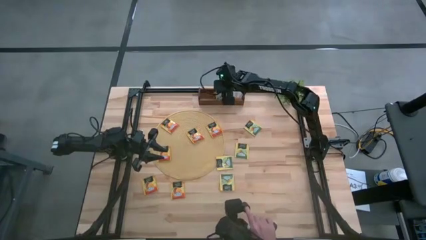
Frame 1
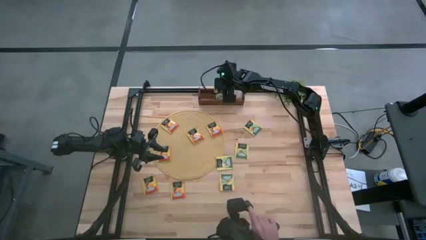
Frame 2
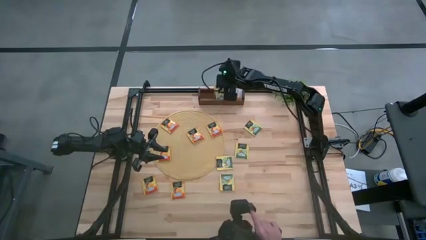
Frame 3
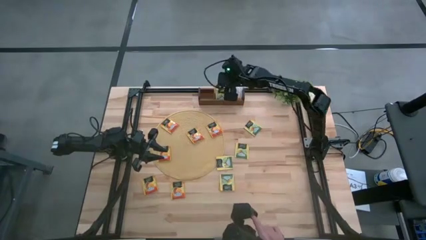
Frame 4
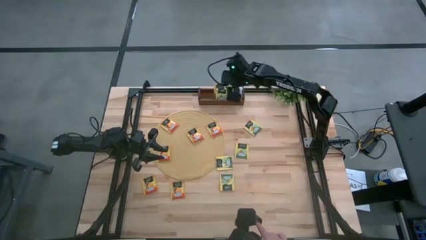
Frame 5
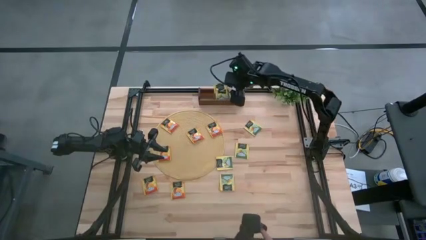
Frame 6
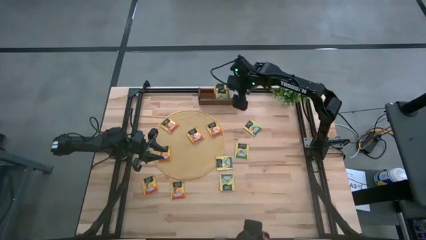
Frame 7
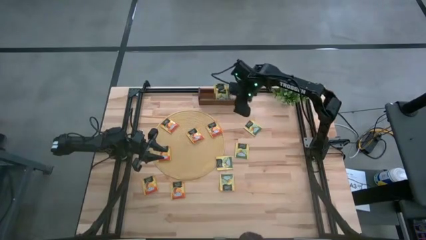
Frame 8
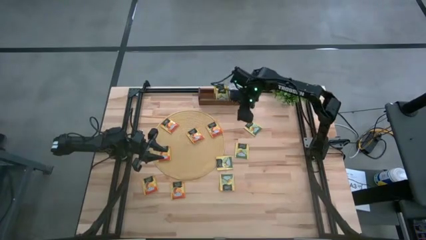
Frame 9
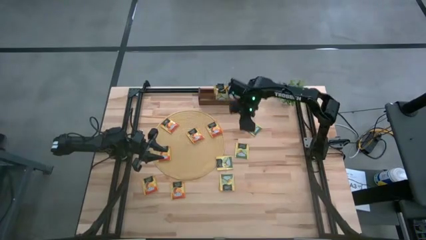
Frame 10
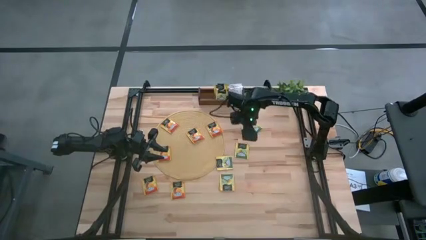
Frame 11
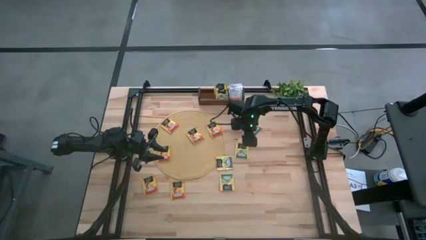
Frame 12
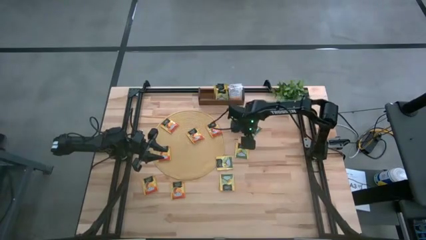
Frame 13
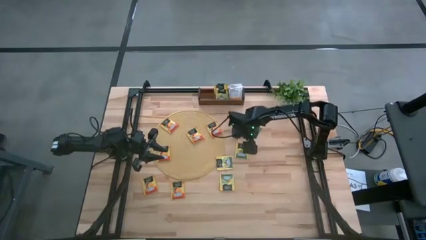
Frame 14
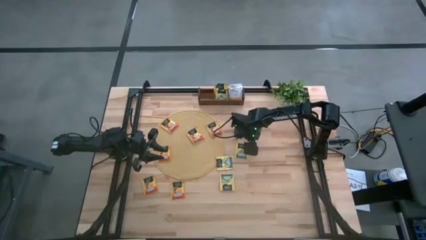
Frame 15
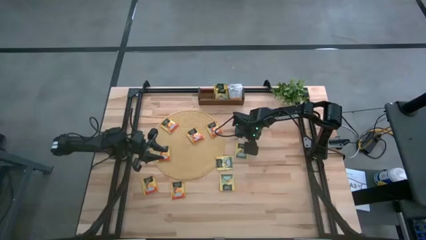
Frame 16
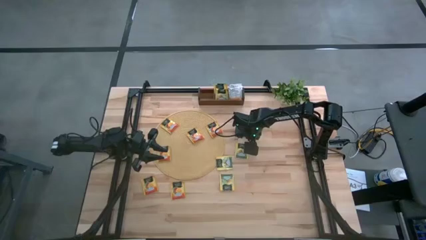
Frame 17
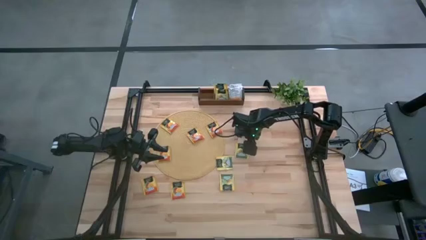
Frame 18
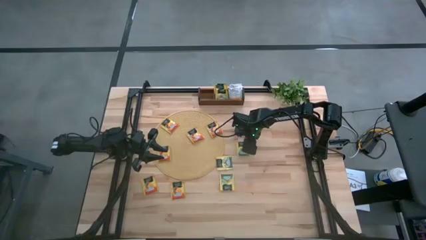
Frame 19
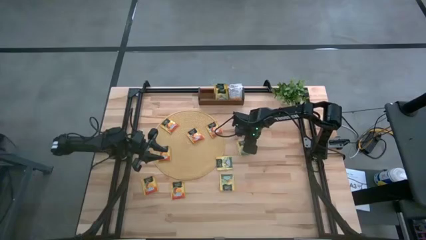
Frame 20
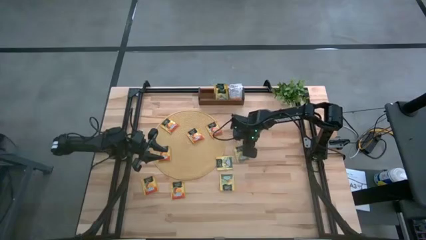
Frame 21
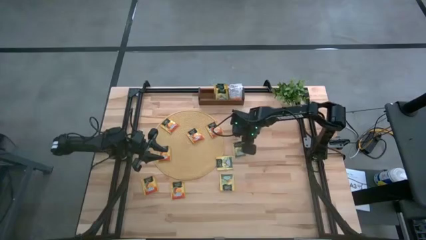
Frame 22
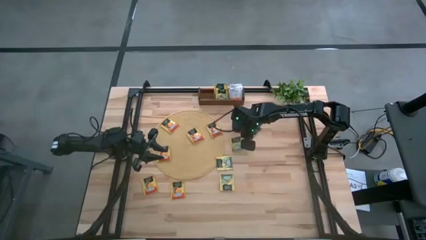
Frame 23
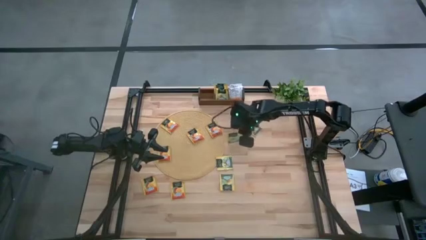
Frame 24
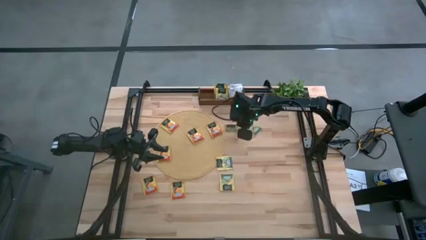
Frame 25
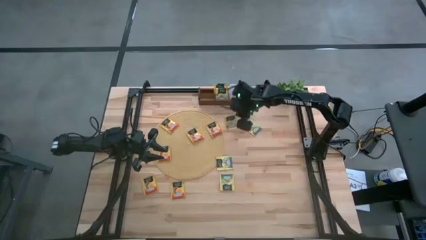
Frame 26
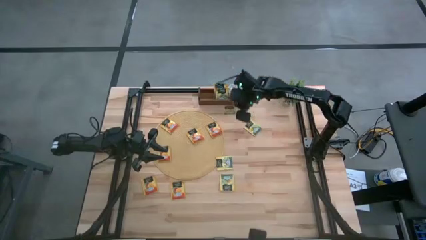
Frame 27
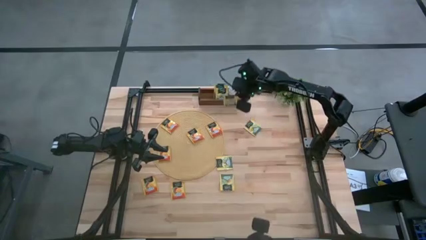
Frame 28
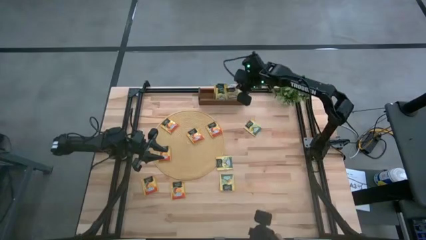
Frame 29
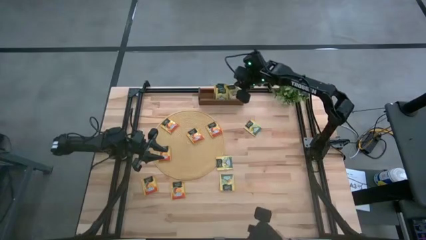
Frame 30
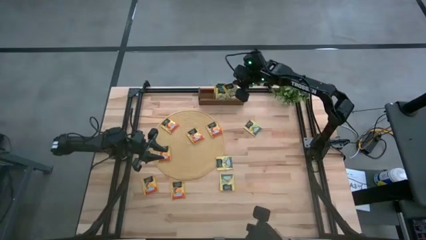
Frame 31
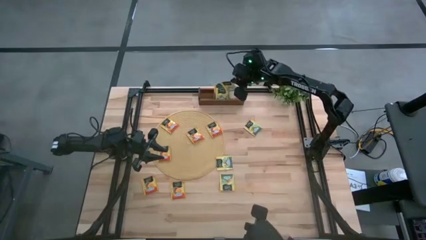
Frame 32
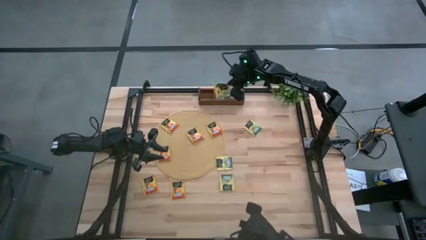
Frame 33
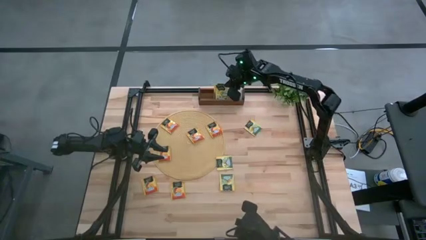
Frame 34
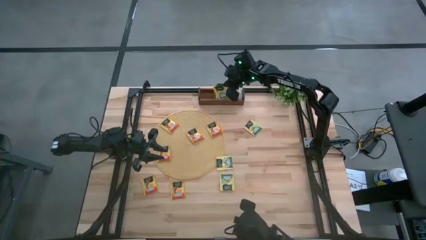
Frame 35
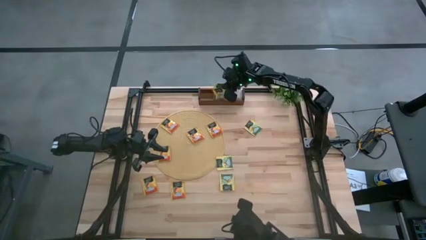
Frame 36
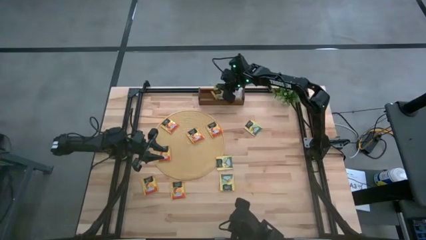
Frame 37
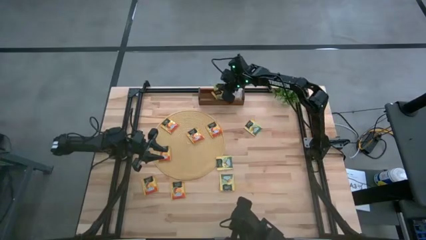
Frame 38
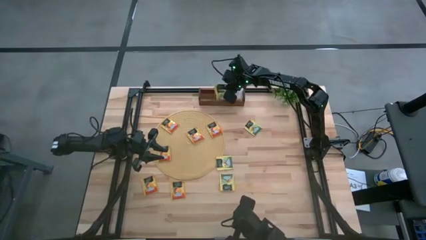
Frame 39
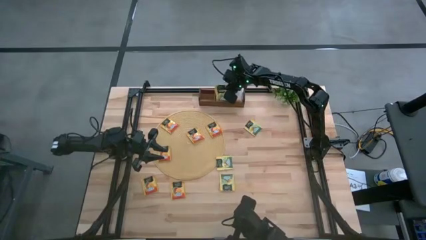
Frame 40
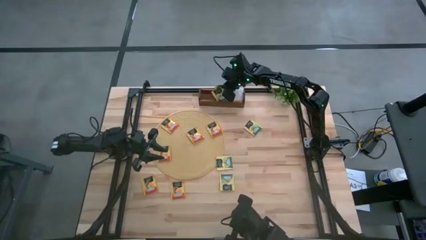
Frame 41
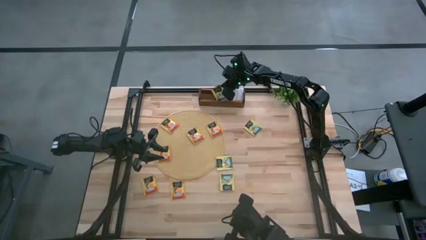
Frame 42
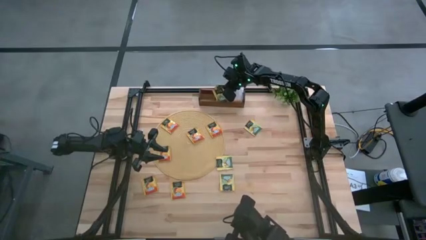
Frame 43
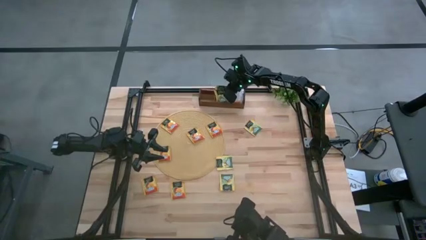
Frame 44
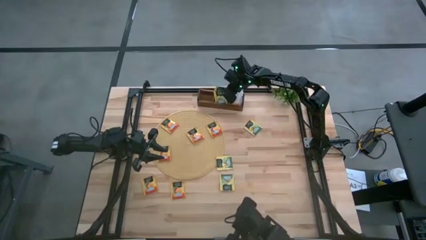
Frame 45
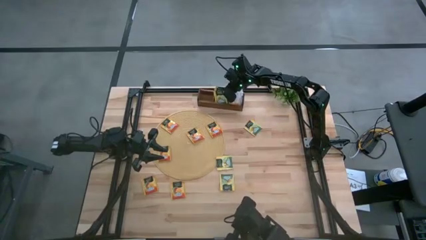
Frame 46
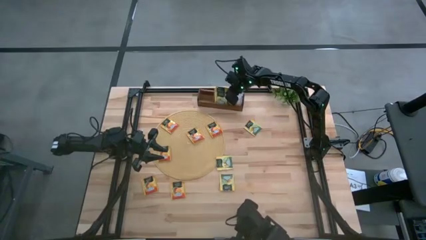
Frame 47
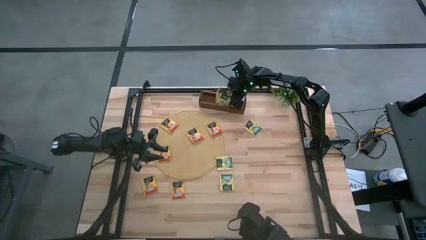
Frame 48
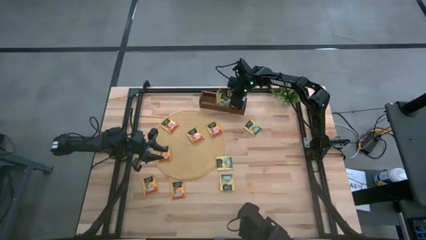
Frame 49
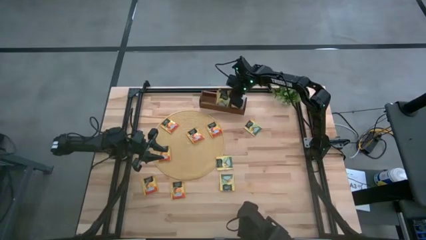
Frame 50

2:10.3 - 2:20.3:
Task: Pick & Place Tea
Put the yellow tea bag into the middle section of the wooden organizer

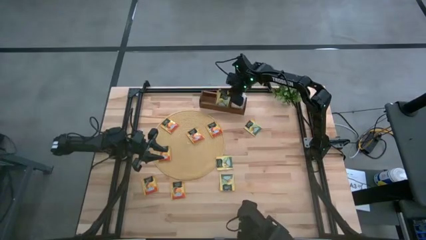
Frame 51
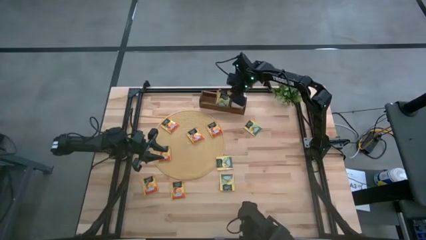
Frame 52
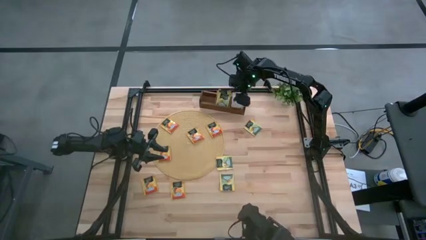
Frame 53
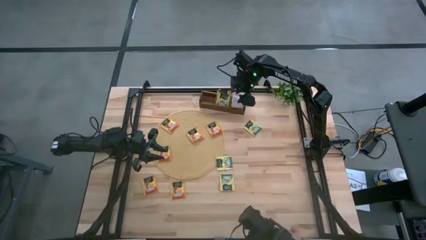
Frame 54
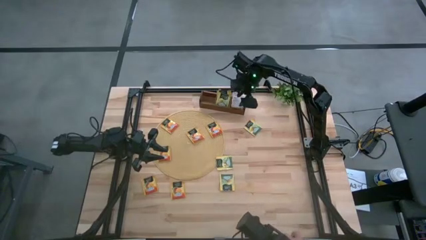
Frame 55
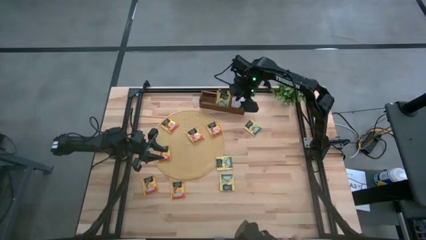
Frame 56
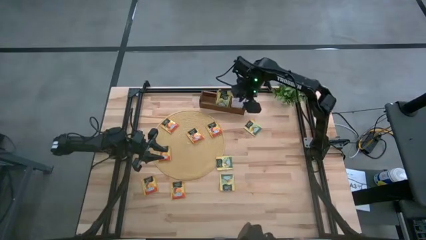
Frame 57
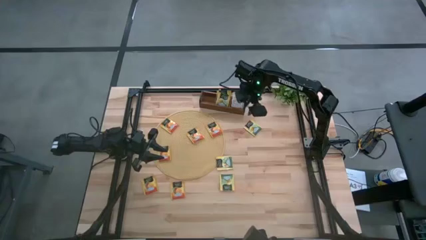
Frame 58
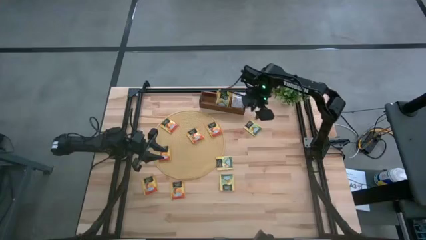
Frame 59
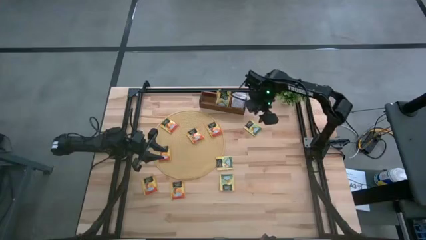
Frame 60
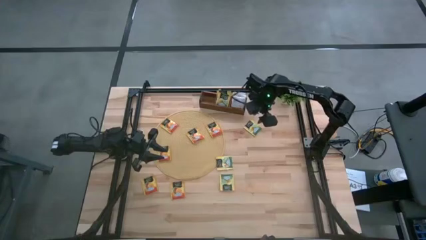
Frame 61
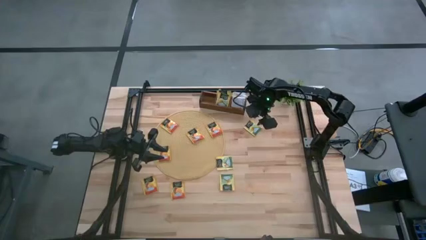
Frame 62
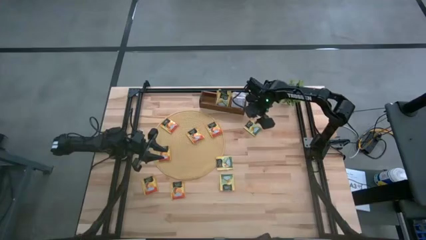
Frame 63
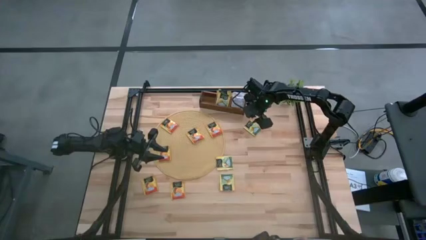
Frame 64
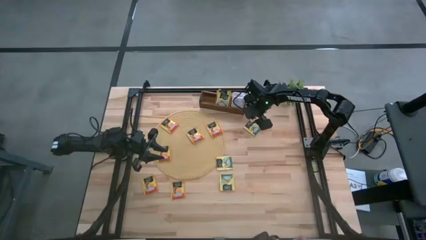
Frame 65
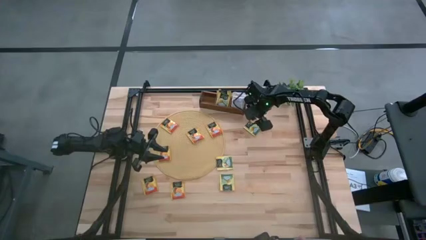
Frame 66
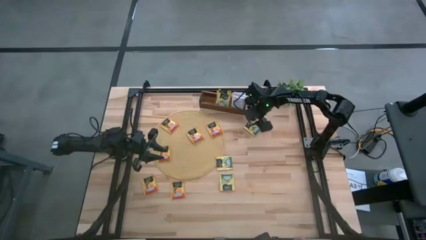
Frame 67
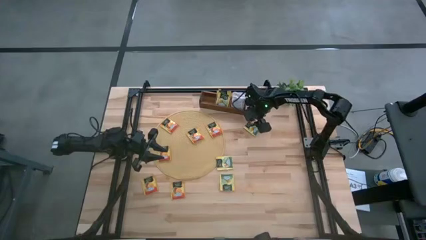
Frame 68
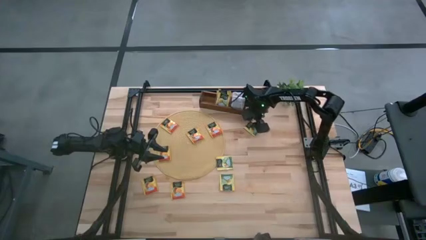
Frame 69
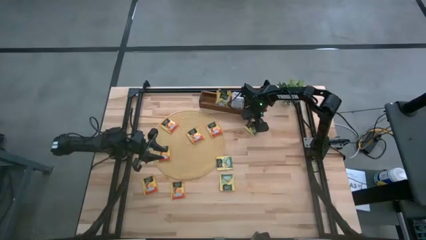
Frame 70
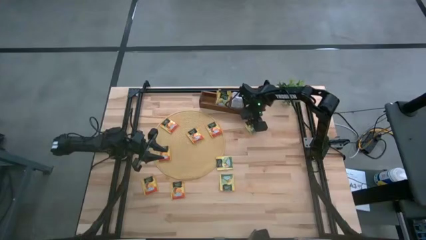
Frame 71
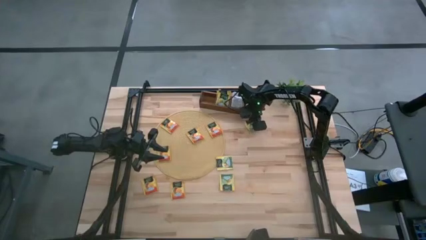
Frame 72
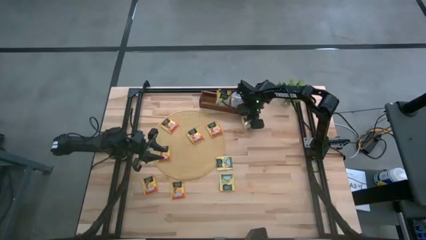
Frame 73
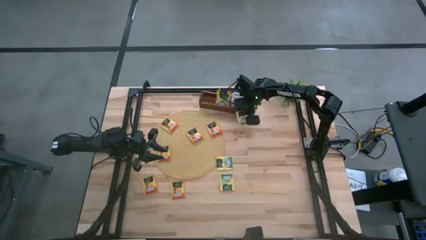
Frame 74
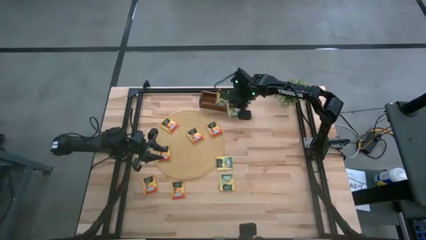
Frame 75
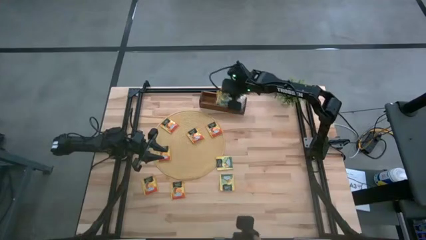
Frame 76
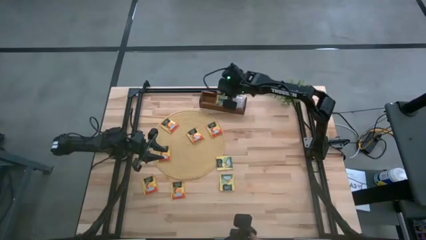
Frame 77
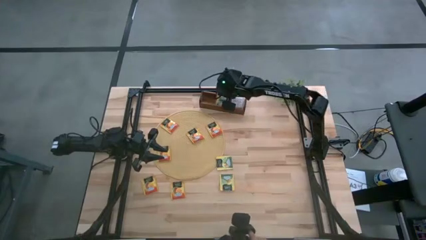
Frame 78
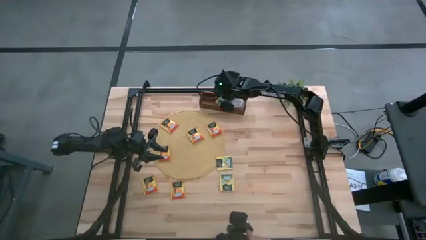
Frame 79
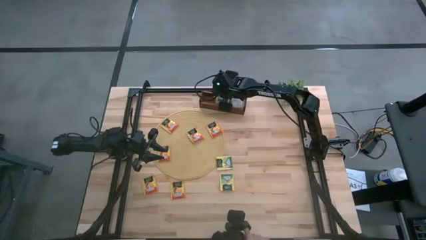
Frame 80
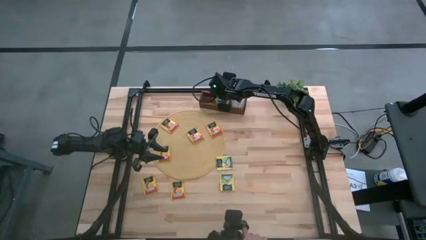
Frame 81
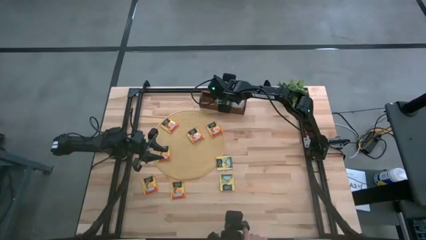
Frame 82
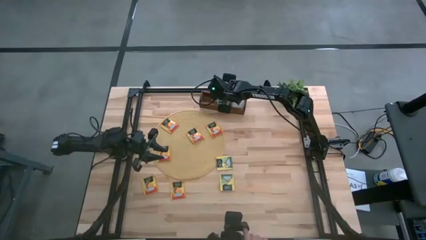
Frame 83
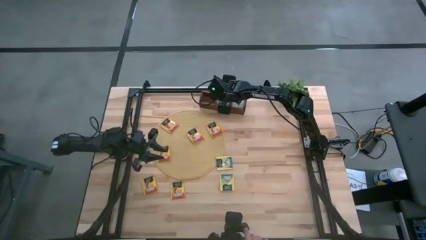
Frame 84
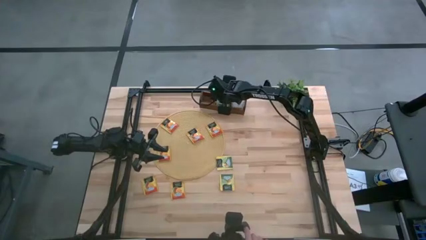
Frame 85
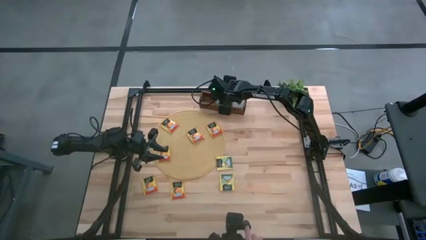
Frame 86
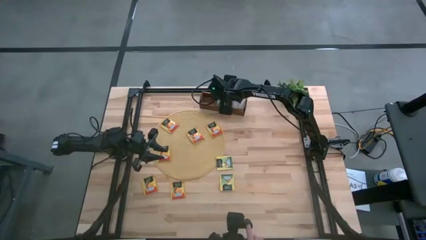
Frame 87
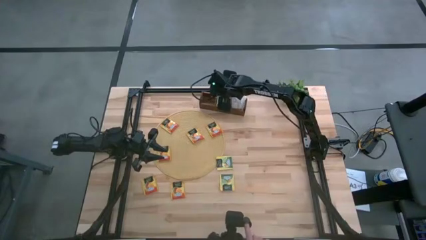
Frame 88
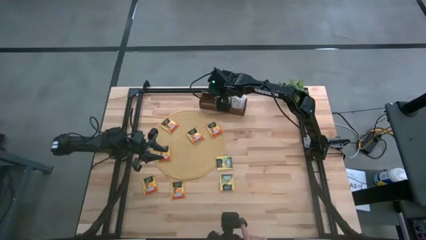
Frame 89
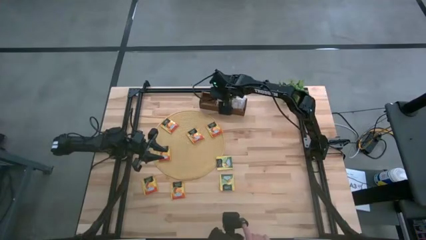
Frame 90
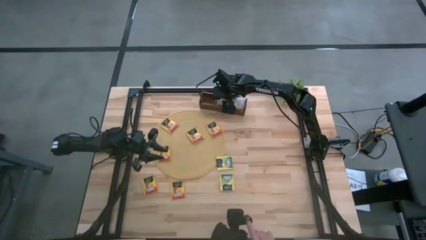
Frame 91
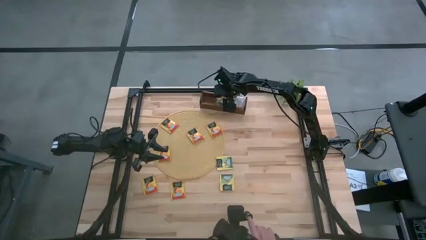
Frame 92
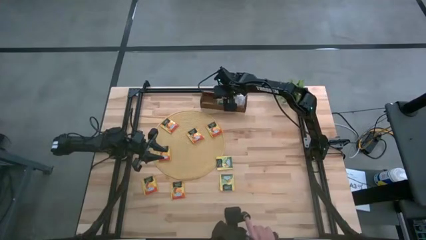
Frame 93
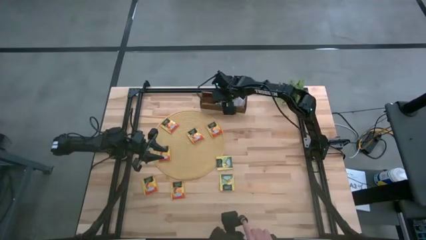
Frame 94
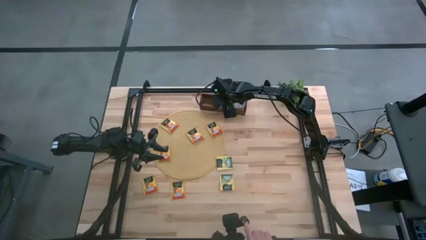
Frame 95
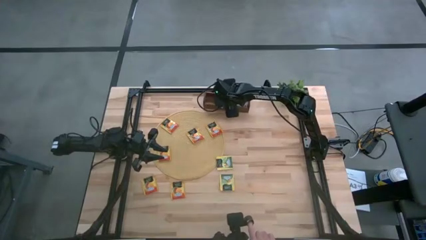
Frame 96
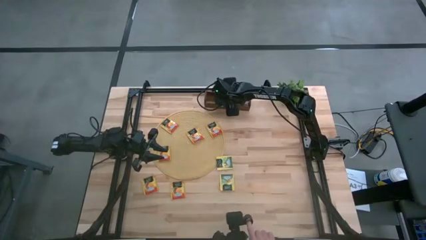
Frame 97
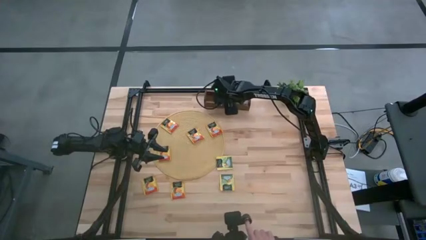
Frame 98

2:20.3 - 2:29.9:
Put the top yellow tea bag into the middle section of the wooden organizer
